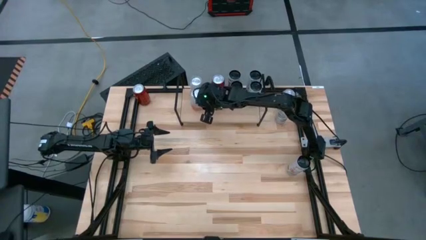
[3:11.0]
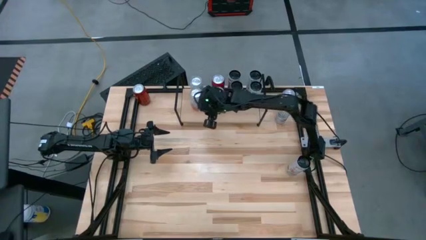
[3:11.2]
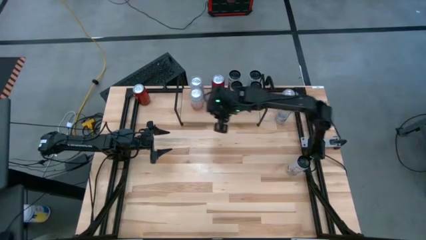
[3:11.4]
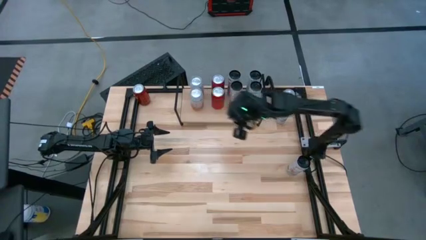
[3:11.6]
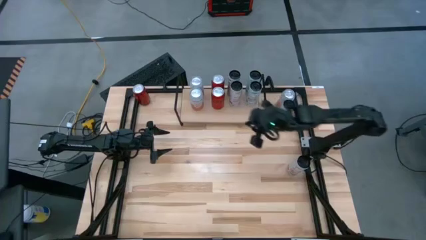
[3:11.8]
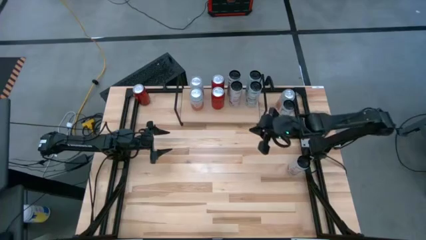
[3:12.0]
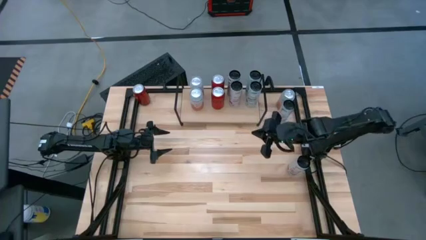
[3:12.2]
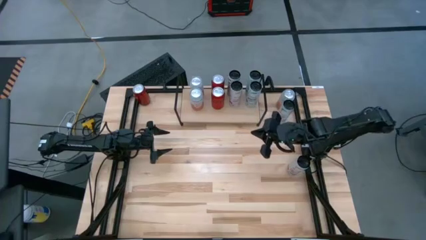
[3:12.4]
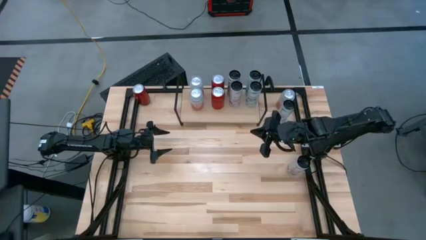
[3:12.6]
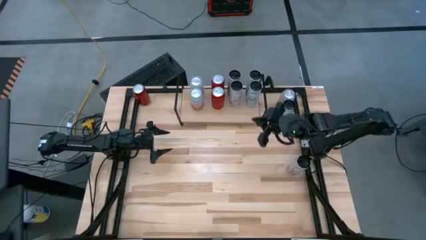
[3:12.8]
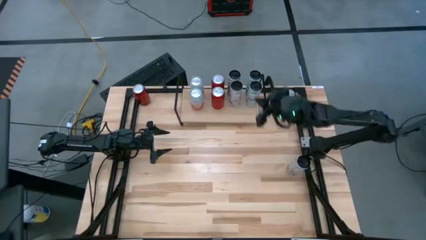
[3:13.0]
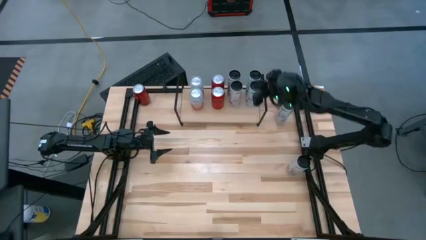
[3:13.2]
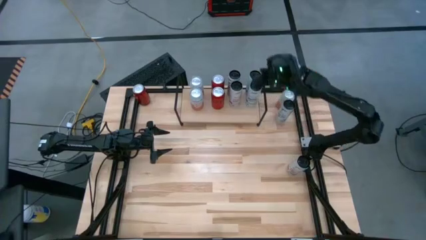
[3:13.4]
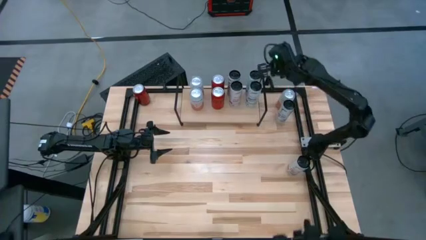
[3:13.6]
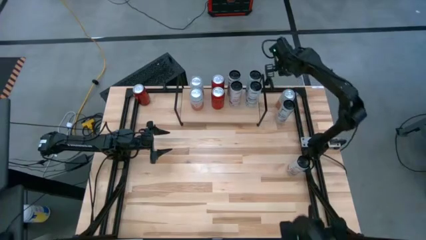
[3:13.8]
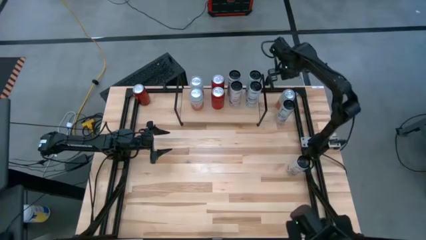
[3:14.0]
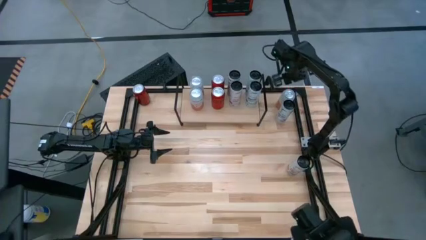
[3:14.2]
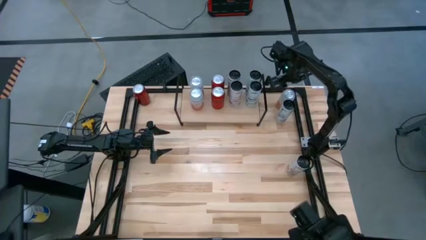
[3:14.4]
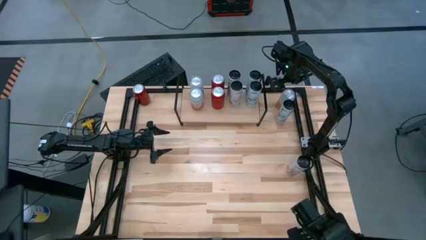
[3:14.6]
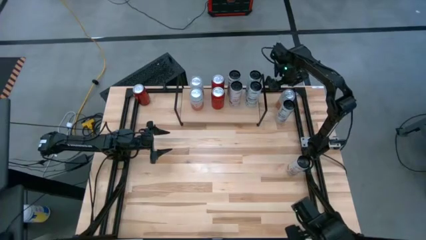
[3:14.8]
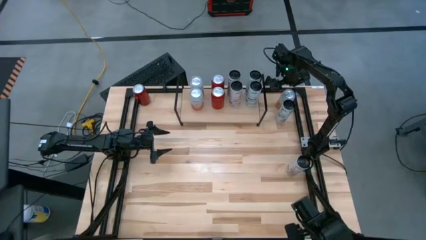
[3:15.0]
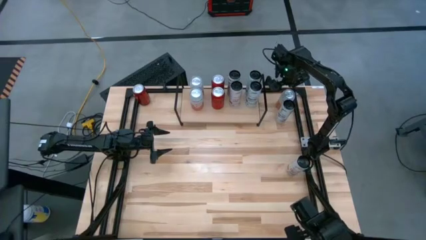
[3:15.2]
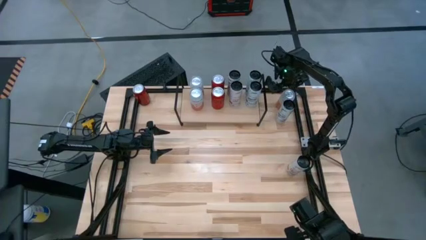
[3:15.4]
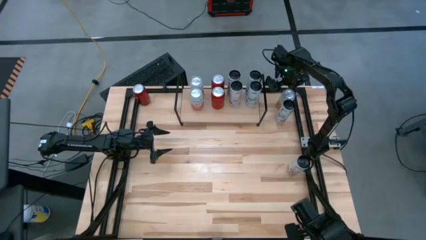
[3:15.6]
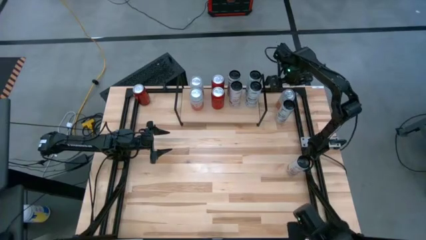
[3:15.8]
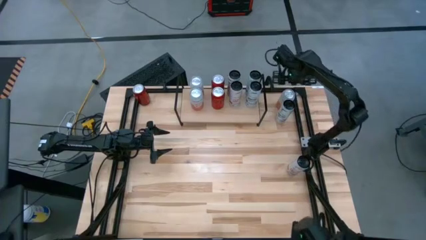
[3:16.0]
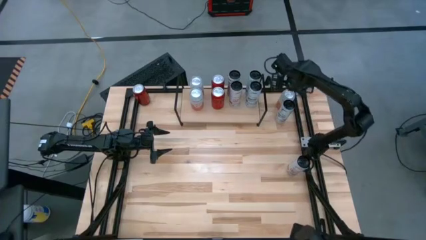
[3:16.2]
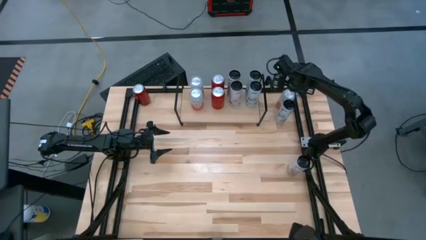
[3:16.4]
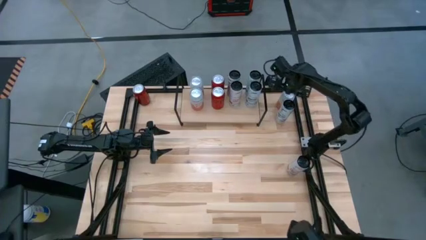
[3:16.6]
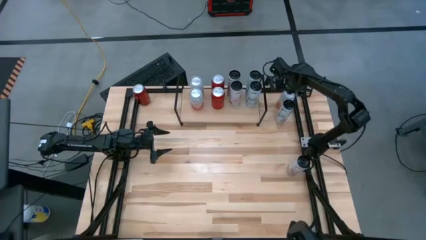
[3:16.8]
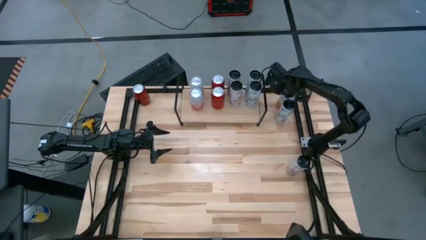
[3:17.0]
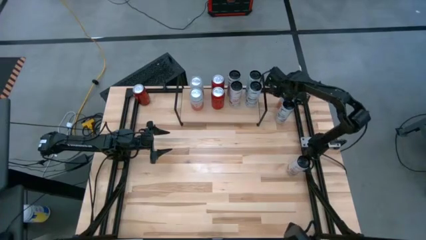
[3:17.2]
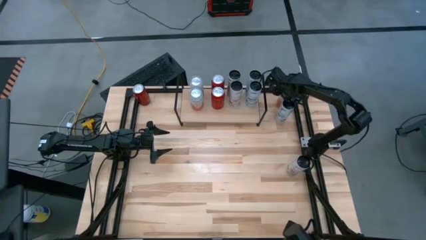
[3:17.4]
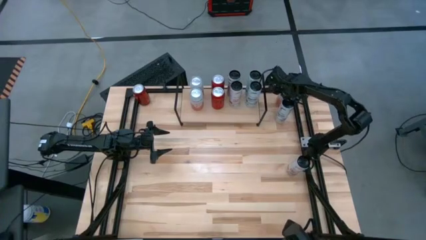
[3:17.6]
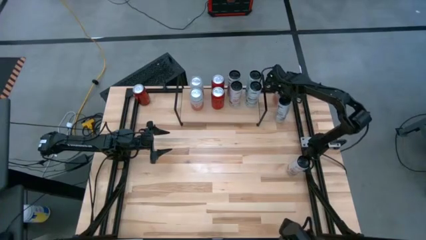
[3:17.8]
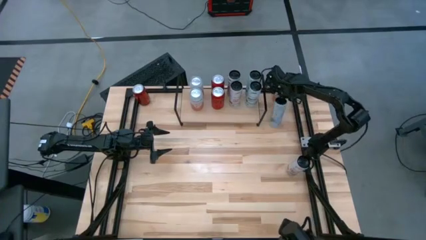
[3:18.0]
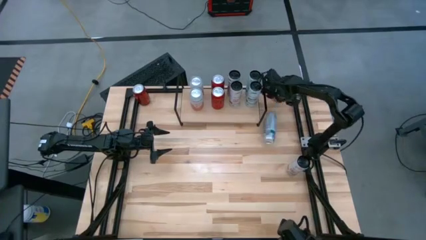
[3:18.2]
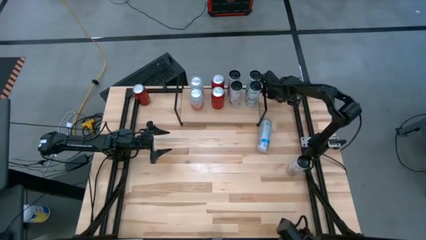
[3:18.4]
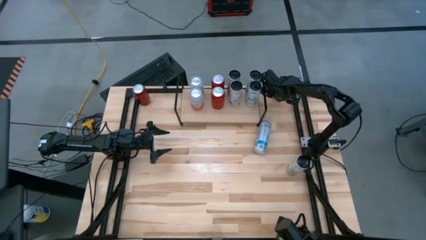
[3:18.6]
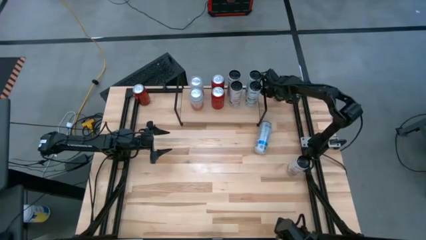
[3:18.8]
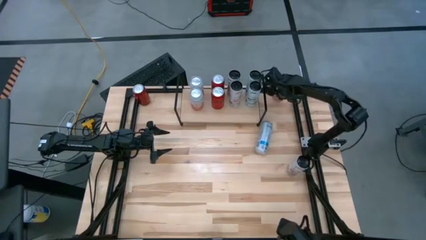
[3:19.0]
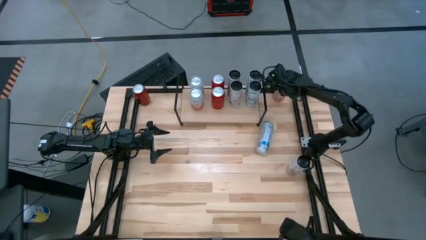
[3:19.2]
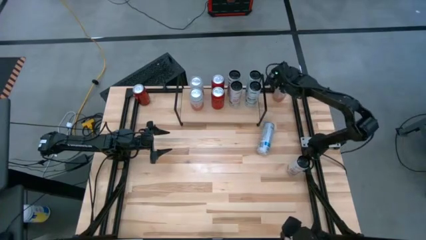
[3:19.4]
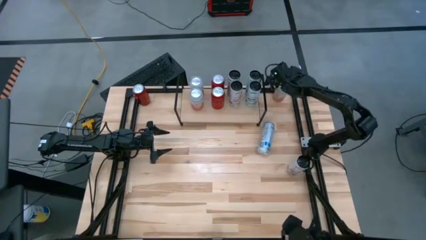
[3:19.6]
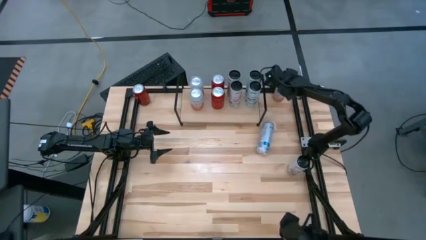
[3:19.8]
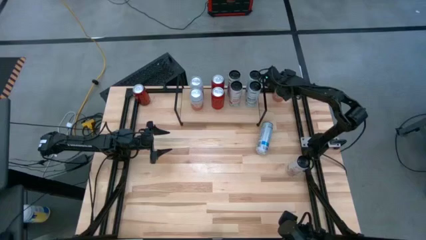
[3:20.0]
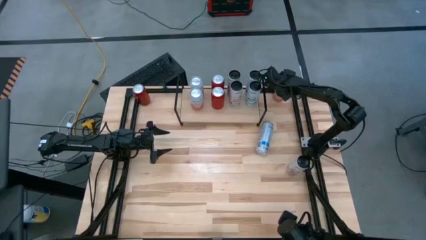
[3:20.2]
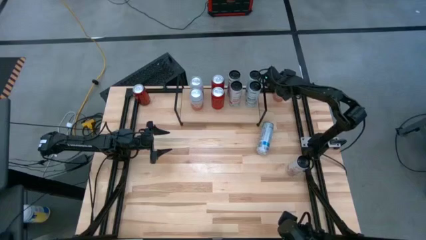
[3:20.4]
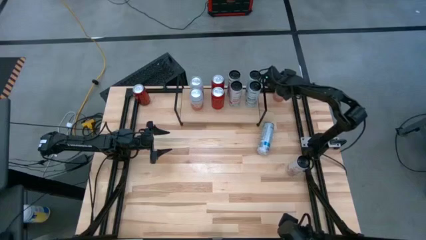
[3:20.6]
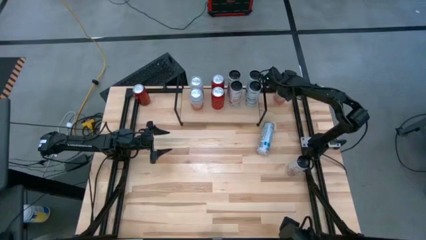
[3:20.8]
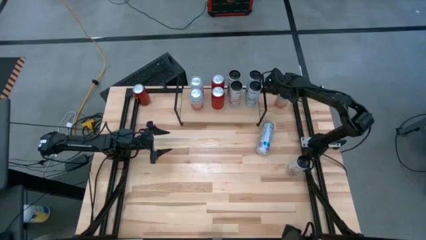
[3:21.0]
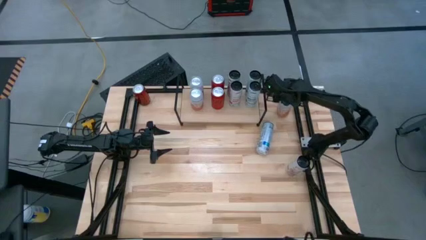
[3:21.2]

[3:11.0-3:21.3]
Task: Place canned beverage on shelf
Put the orange white soda can on the shelf aligned with the other orange white soda can

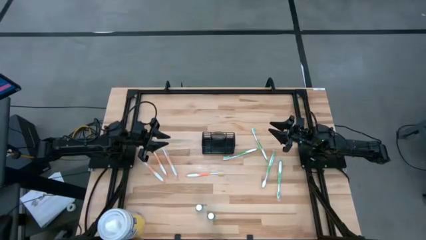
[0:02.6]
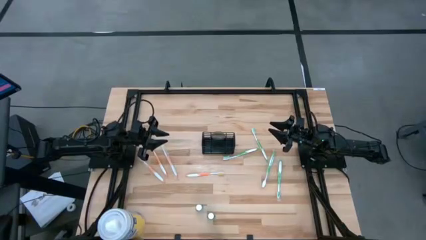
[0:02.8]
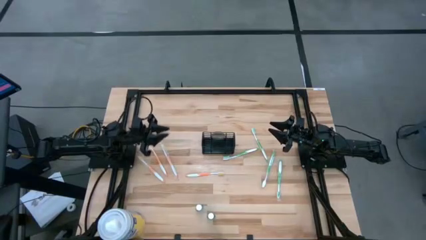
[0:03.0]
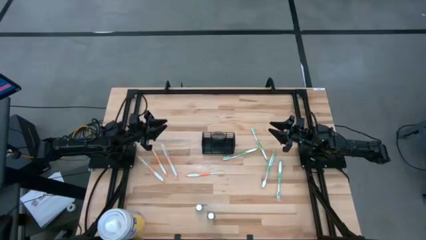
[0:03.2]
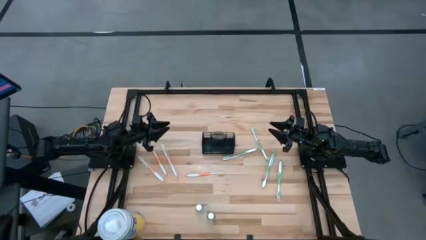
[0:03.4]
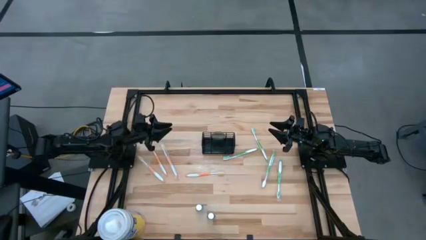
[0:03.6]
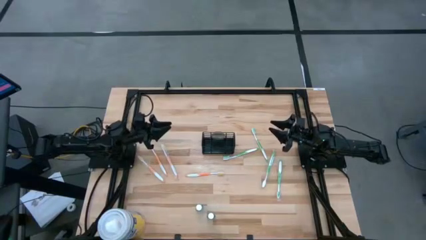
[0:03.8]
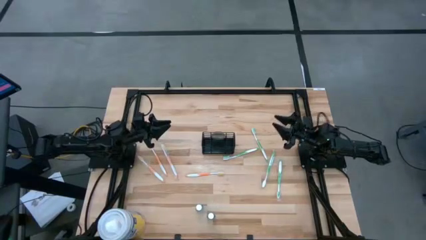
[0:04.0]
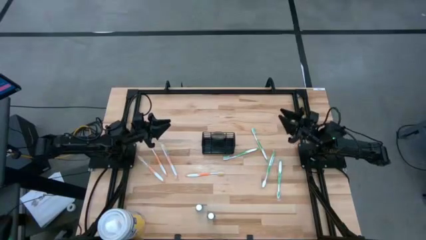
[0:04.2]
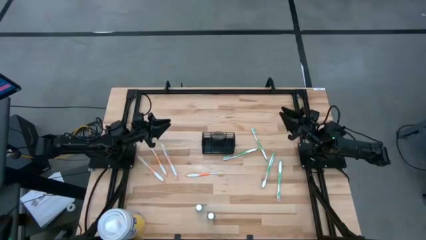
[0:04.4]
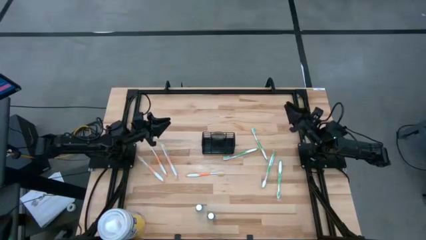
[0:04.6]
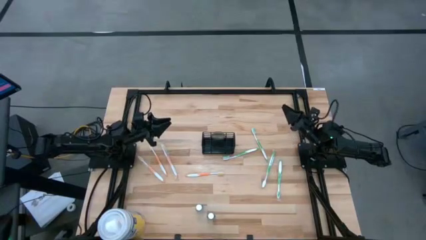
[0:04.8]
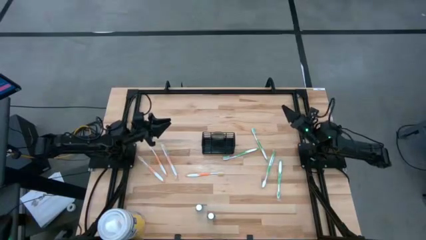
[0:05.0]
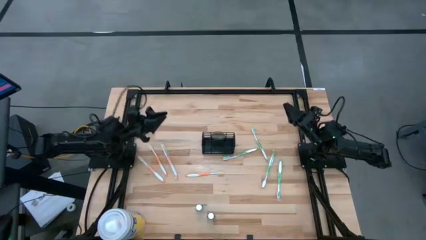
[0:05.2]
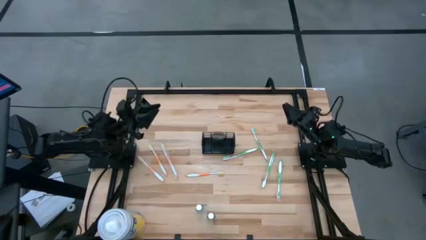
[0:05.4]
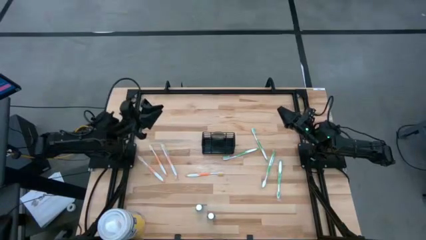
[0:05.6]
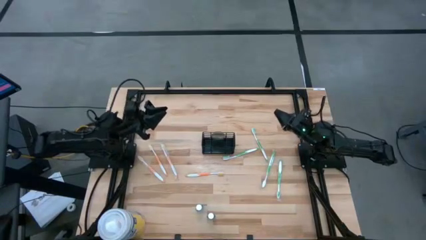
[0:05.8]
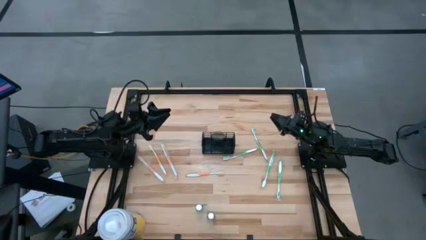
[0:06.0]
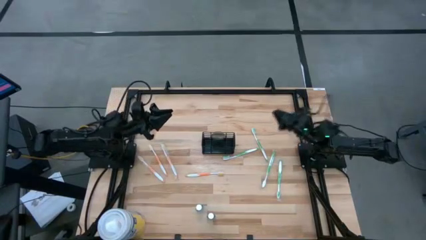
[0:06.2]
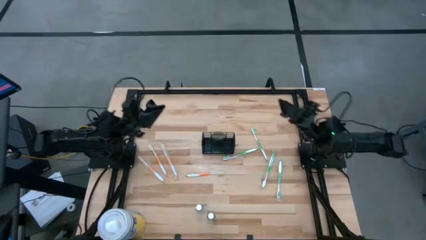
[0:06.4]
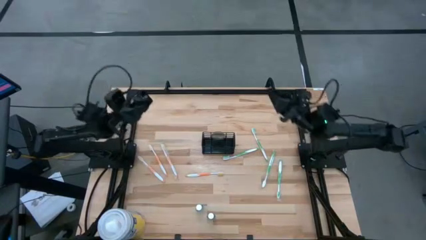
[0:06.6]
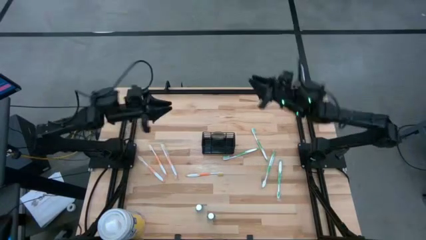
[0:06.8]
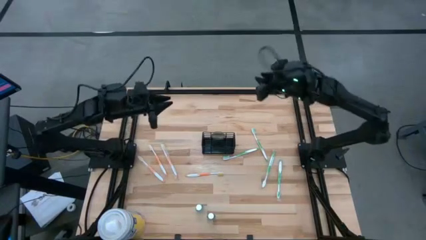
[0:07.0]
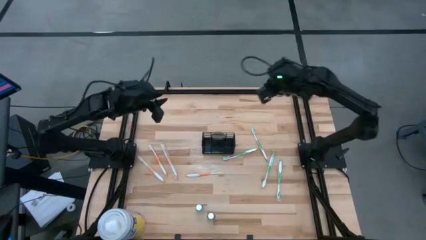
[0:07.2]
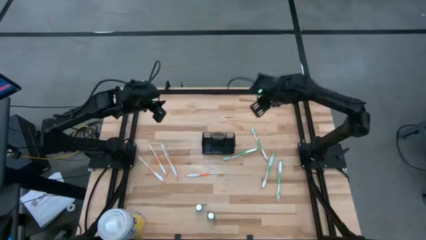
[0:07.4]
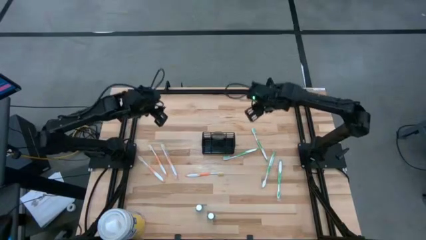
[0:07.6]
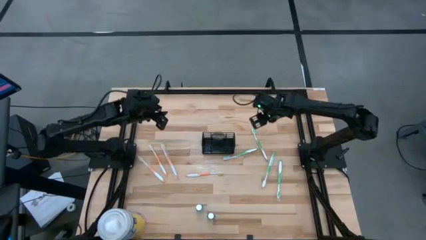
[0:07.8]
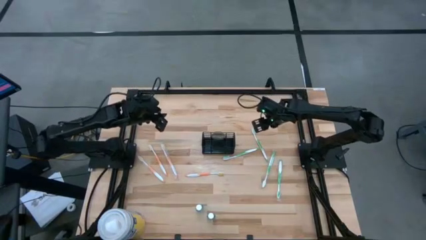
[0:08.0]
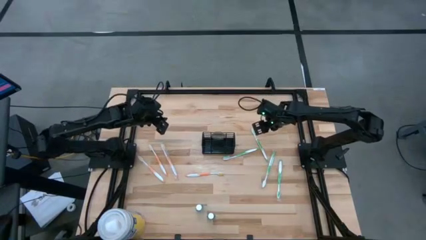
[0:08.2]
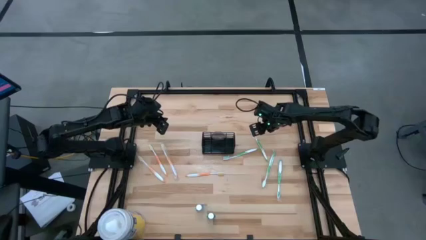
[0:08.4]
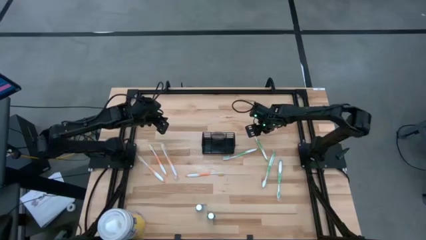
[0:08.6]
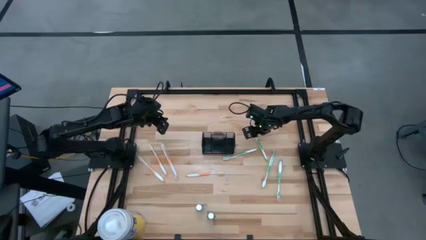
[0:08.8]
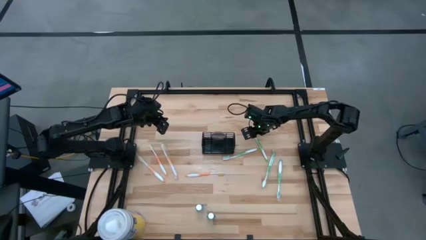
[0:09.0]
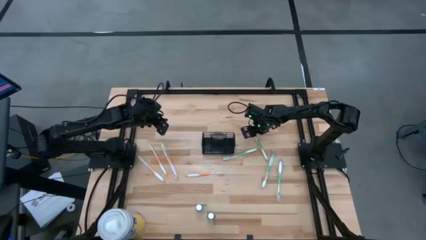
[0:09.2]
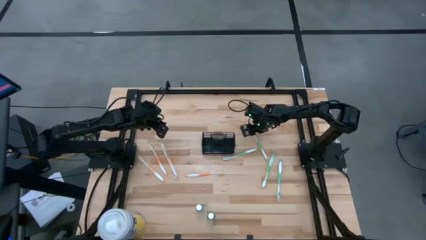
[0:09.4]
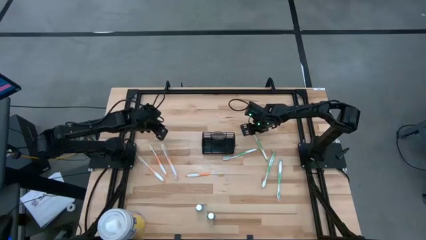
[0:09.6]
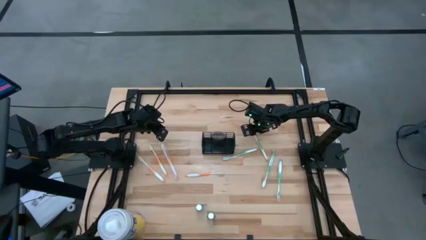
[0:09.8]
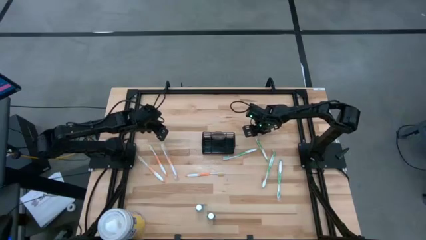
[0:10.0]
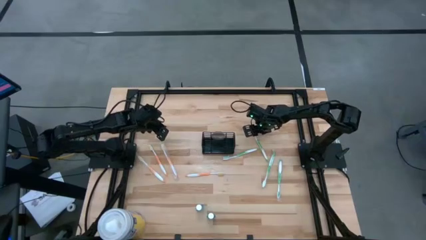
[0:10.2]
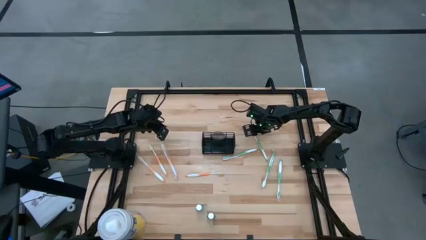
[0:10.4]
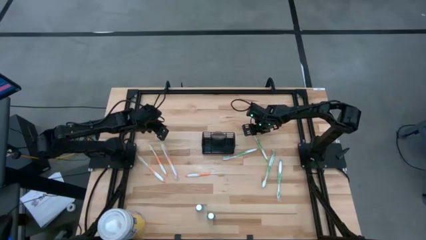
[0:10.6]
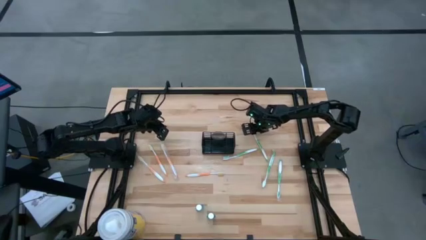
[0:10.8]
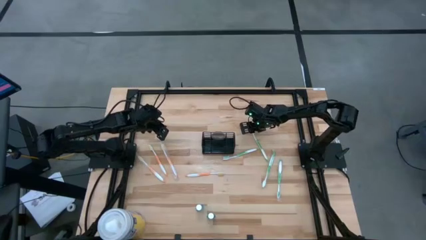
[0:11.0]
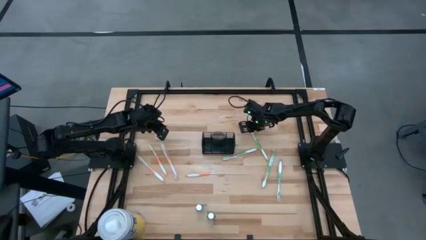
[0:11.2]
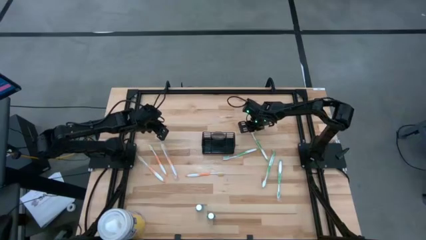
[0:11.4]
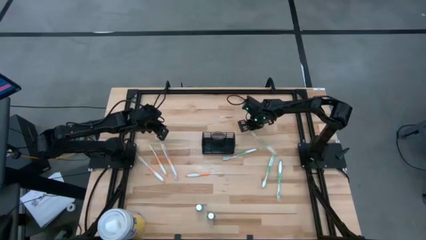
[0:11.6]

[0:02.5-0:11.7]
Task: Pick & Place toothbrushing station
Put the green toothbrush into the wire organizer
